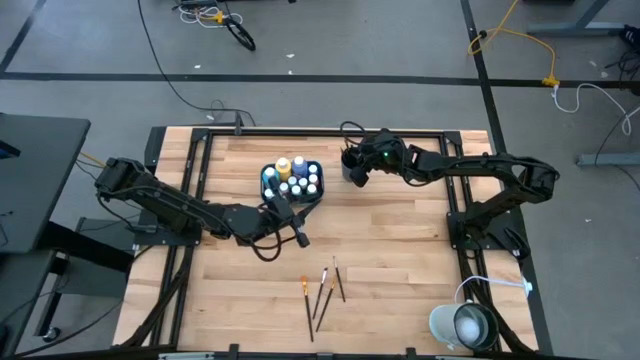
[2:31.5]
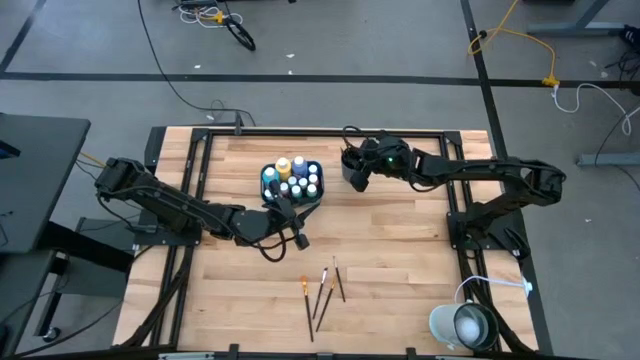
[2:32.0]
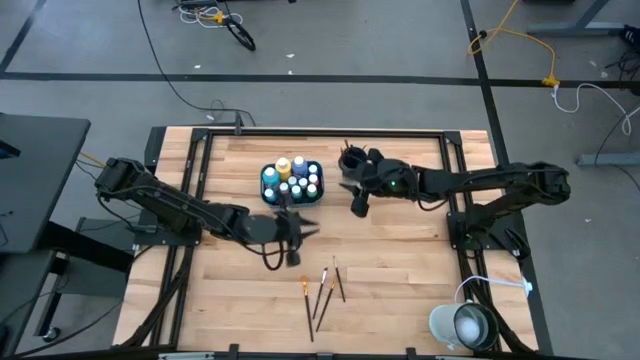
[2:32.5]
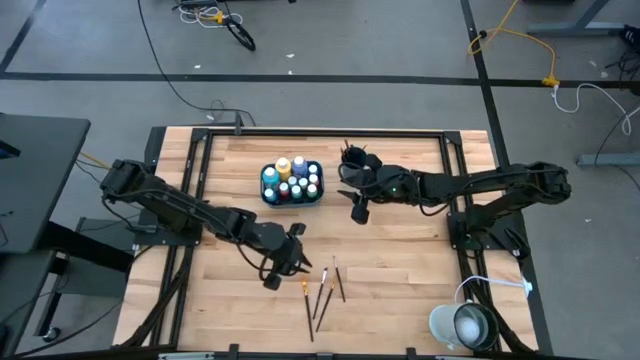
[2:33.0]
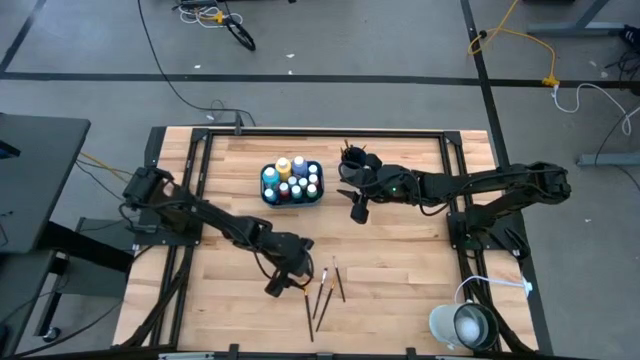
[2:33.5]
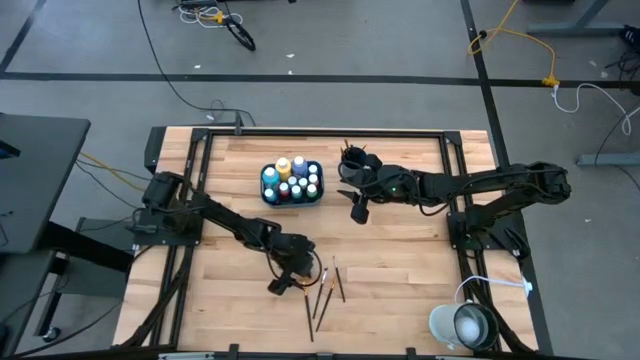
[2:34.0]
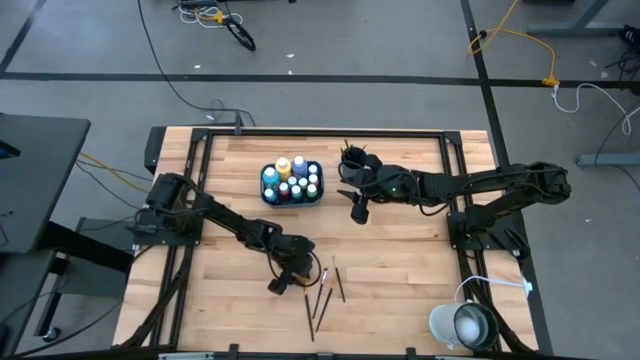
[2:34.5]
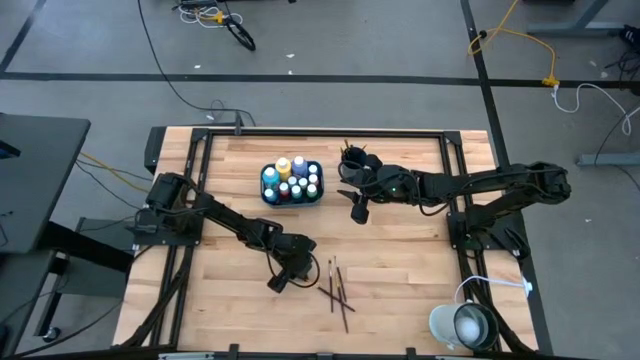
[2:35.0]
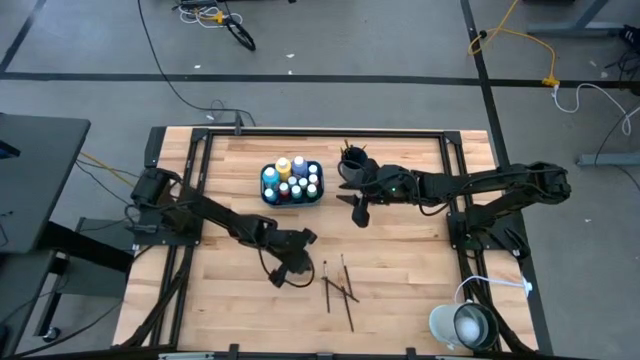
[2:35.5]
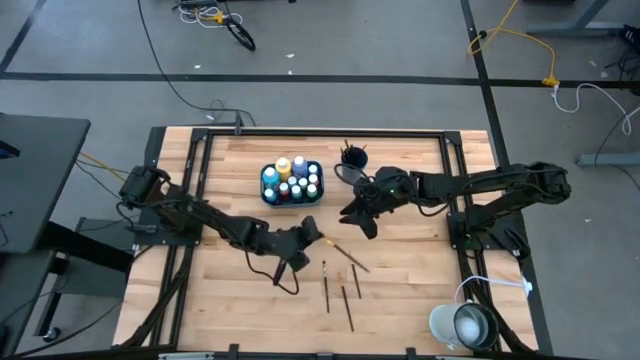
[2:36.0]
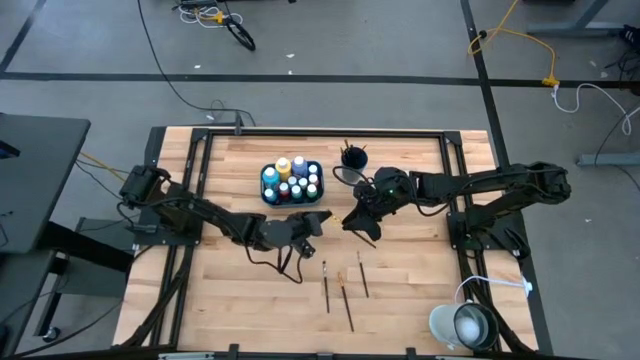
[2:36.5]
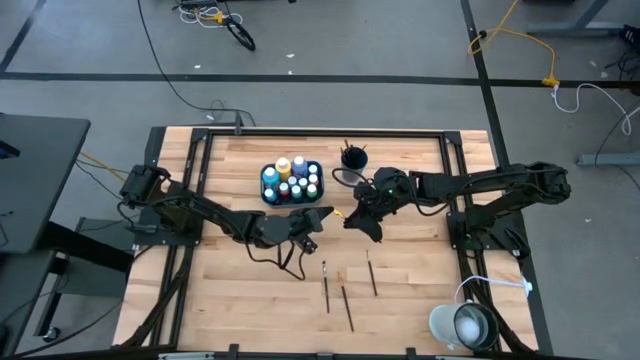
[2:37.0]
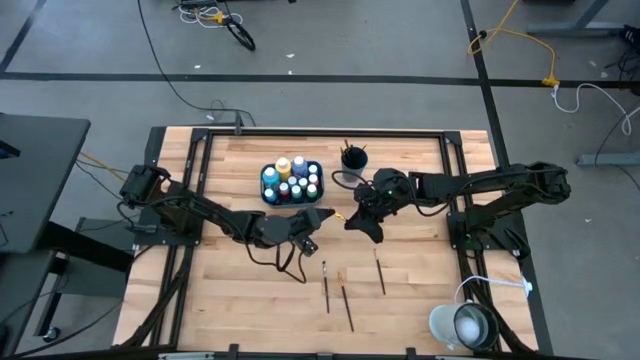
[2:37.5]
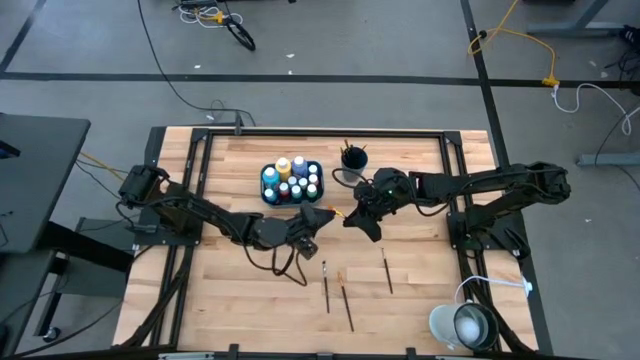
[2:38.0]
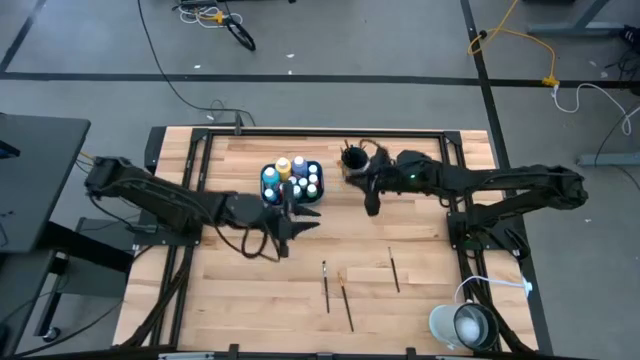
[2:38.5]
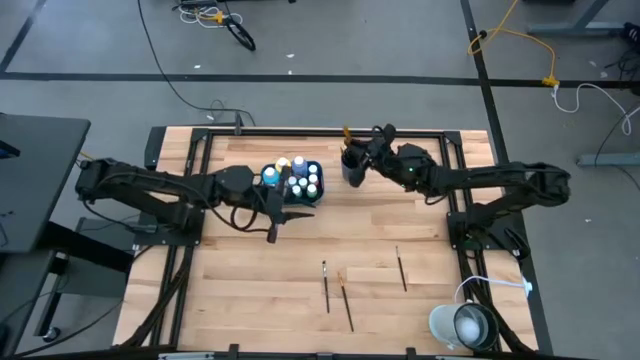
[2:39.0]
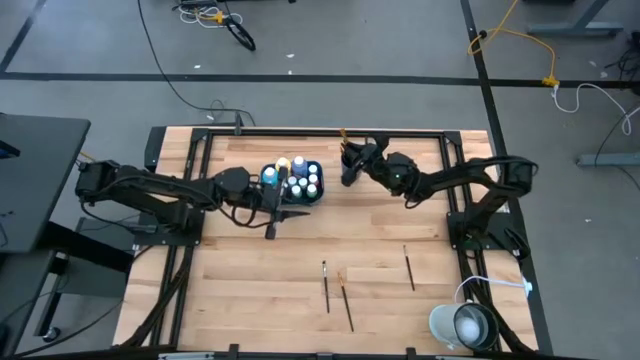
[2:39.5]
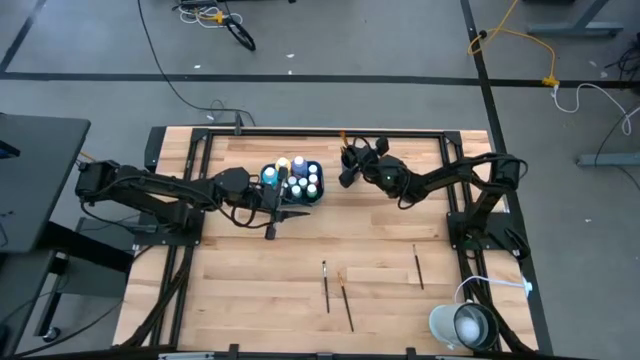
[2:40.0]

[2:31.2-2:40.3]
Task: Pick & Place Paint Supplies
Put the gold paint brush into the blue cup

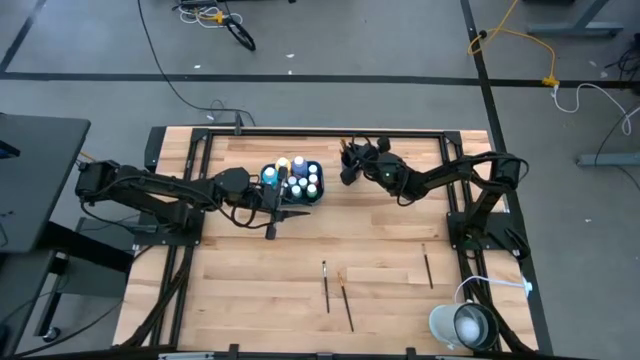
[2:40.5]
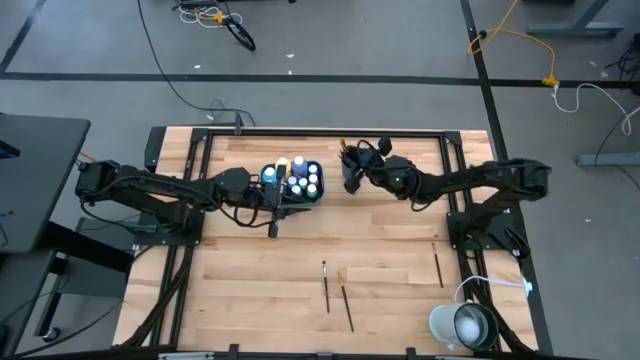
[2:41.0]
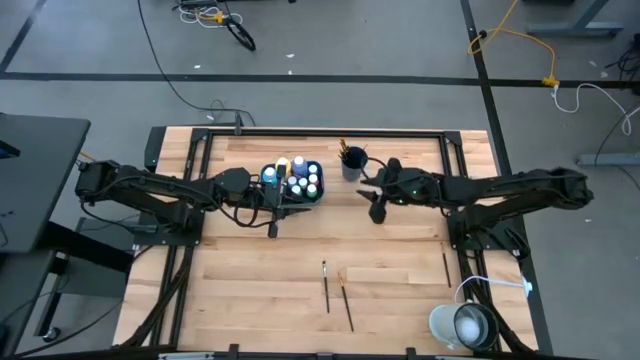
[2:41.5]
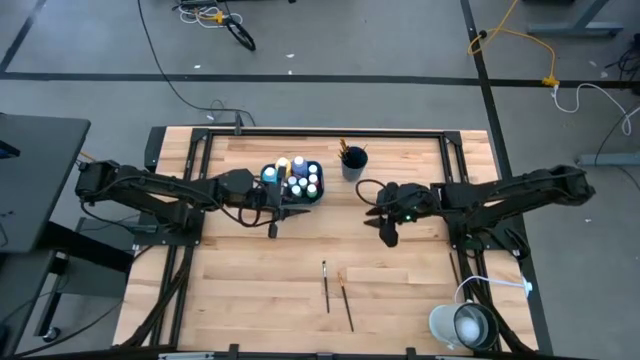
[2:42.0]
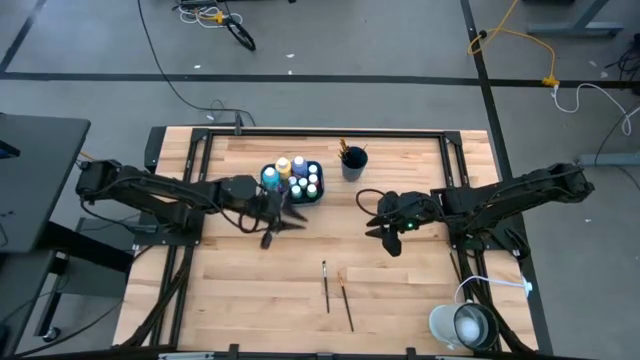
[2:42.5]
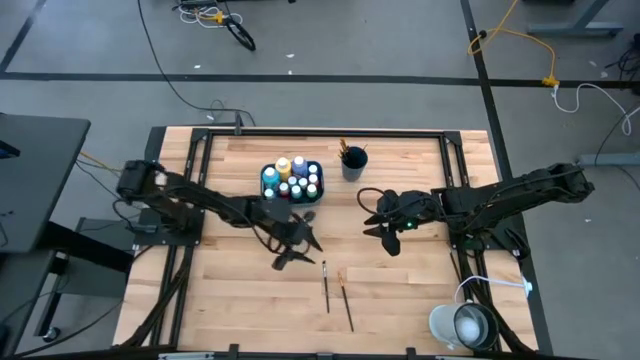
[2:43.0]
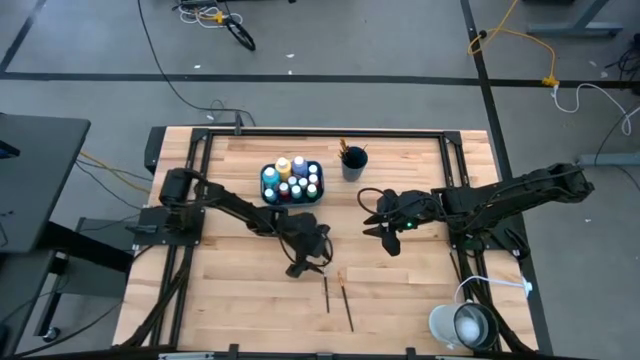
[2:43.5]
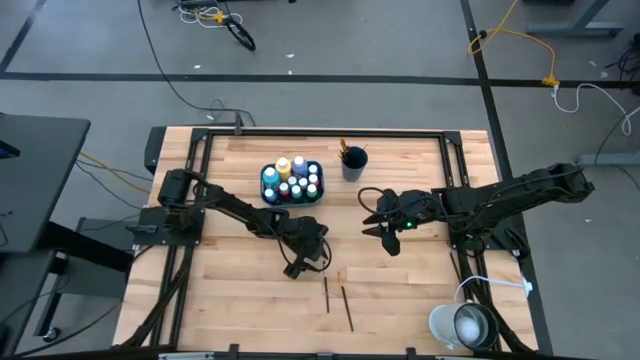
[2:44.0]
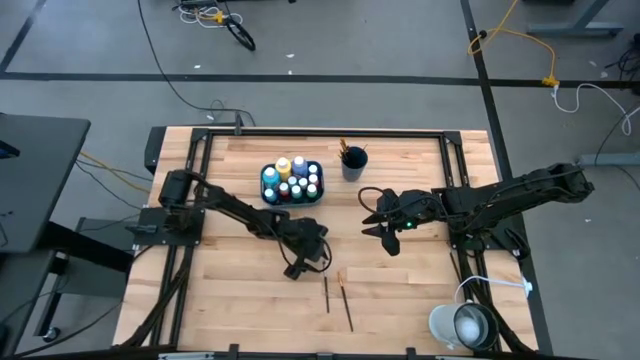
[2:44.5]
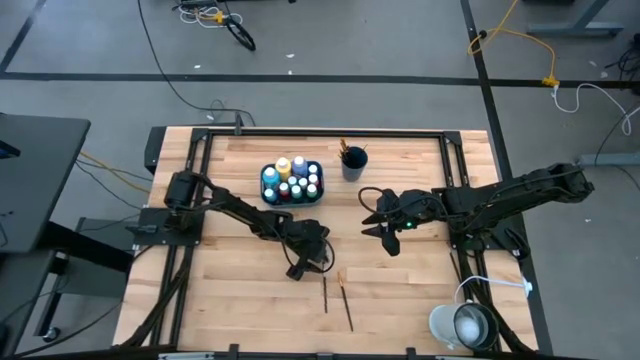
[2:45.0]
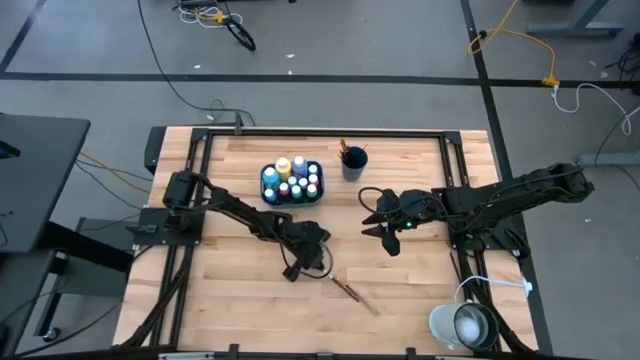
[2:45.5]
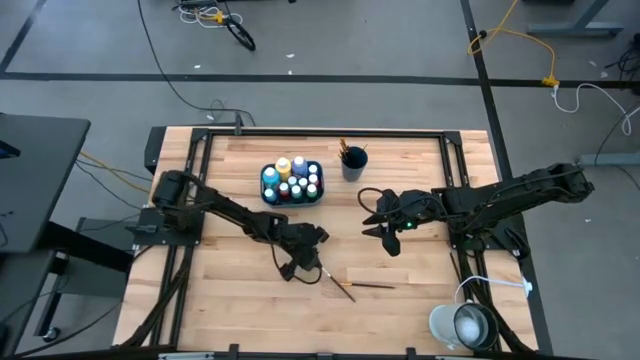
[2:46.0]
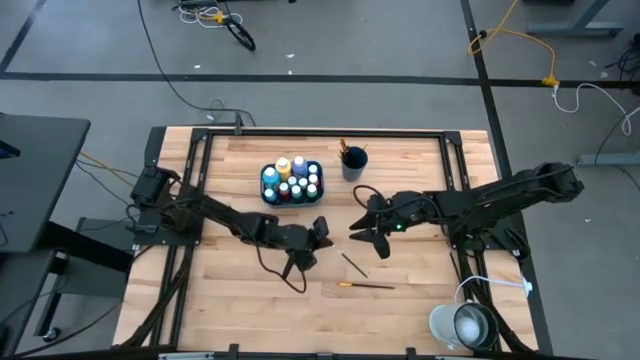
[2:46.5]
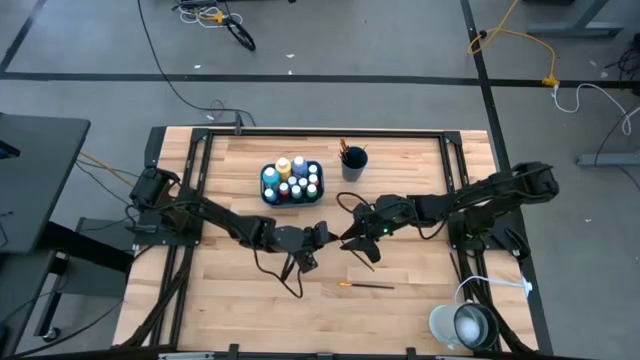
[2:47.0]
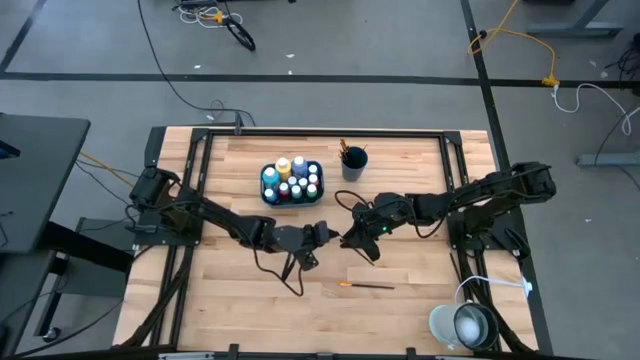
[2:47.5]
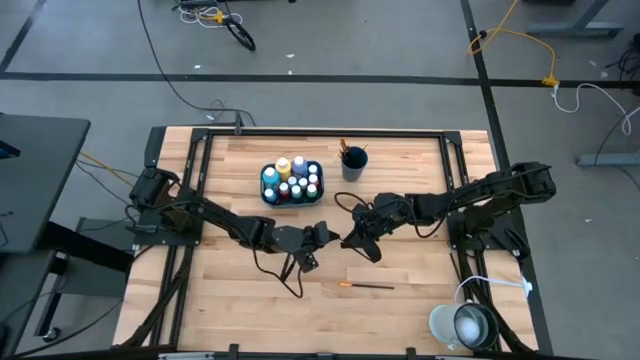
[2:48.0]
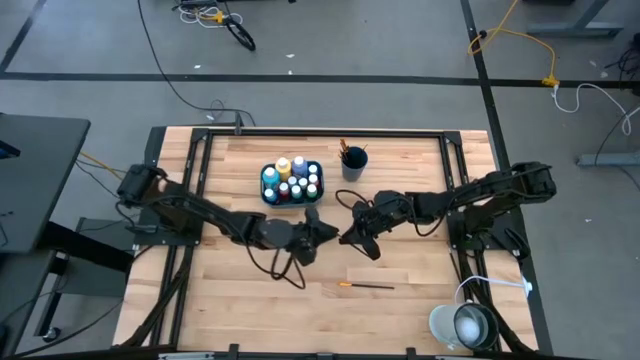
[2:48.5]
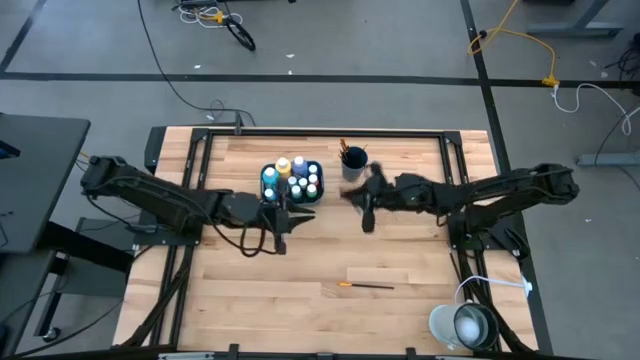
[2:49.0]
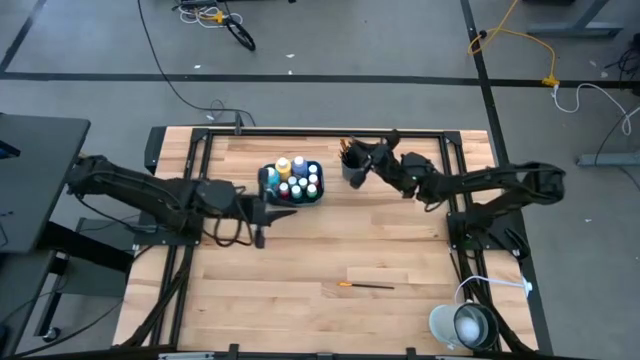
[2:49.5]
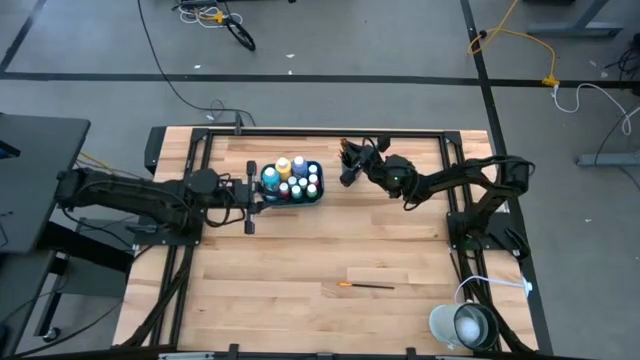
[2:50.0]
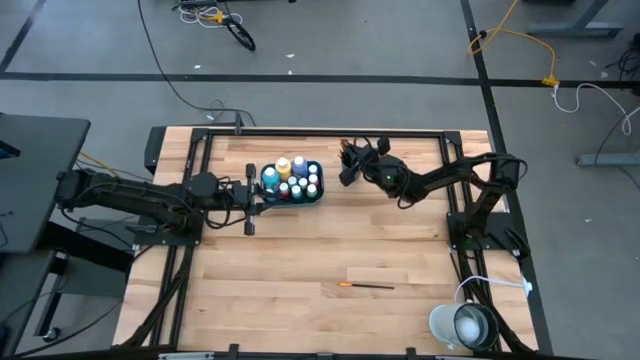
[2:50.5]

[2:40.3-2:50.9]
Put the silver paint brush into the blue cup

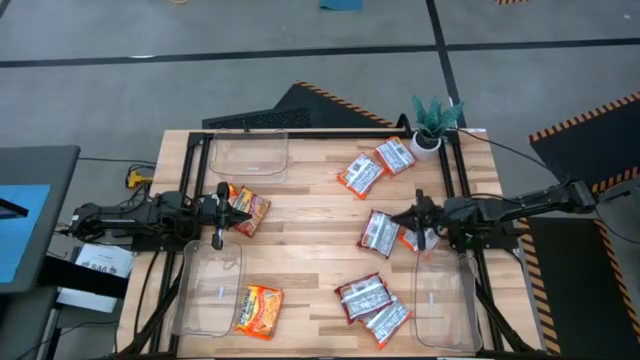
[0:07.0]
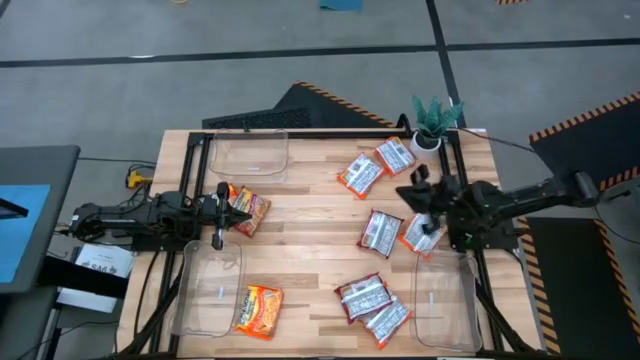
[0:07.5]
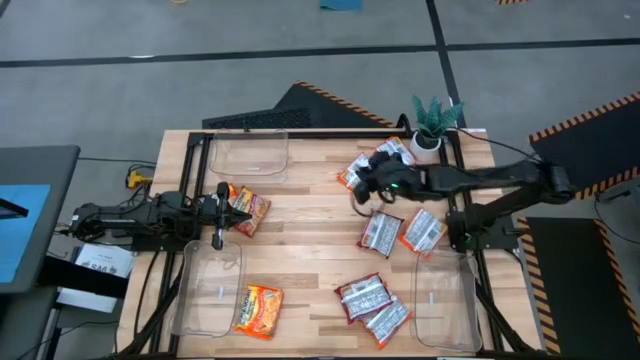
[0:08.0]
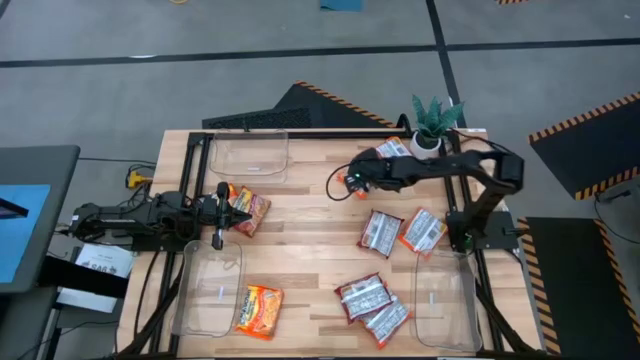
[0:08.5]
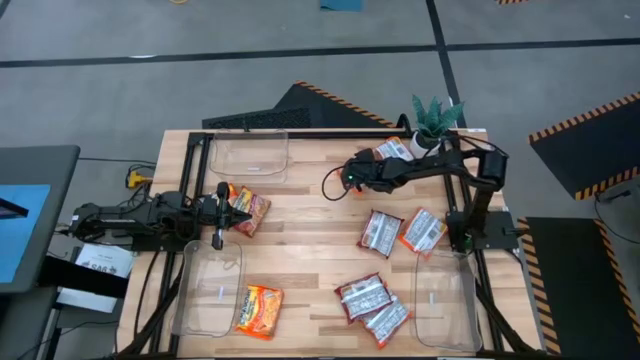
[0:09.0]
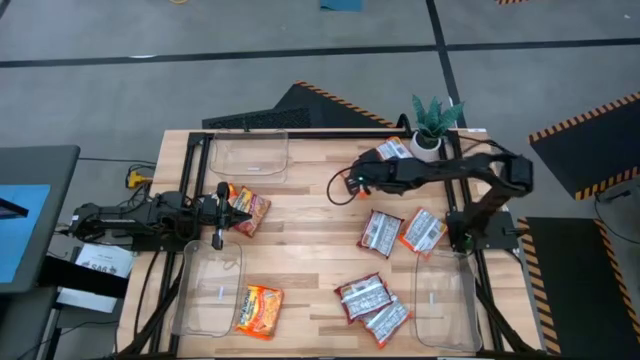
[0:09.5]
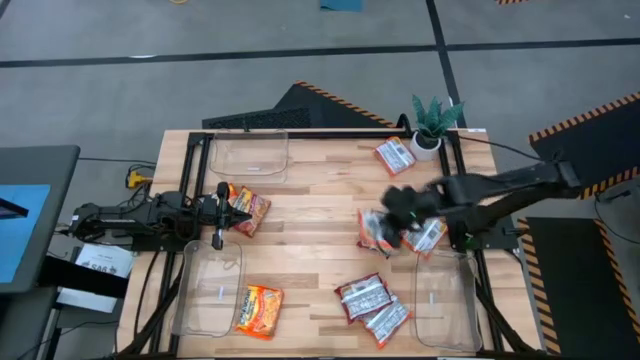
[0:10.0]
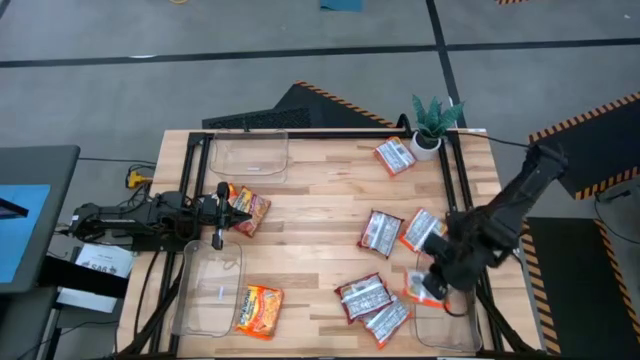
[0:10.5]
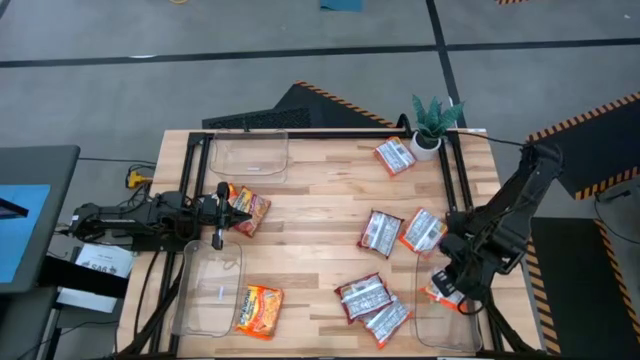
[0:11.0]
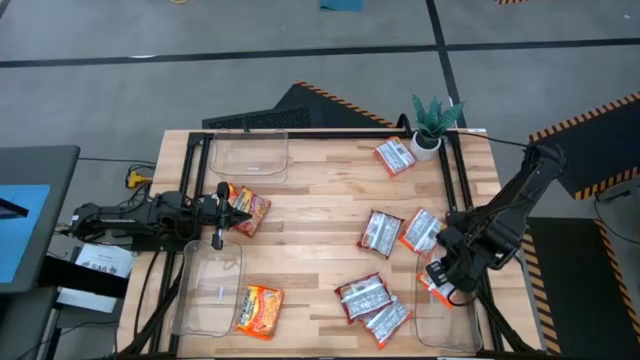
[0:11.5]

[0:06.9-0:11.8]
Task: Sort Maruchan noodles
Put the orange noodle pack into the bottom right transparent bin
